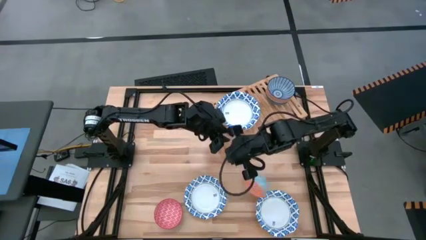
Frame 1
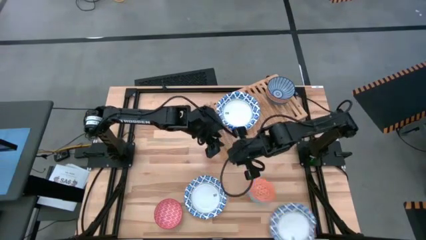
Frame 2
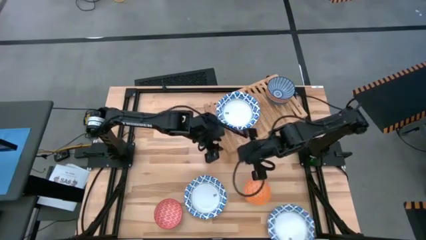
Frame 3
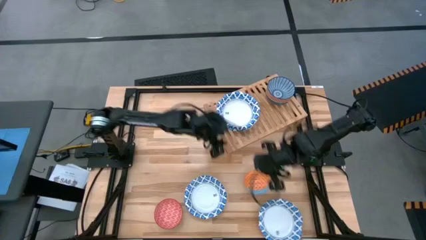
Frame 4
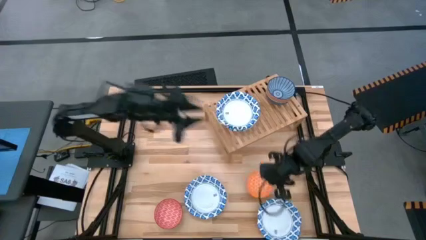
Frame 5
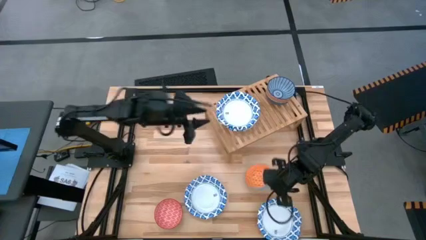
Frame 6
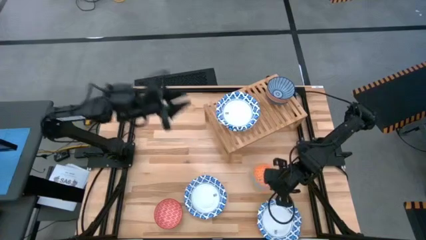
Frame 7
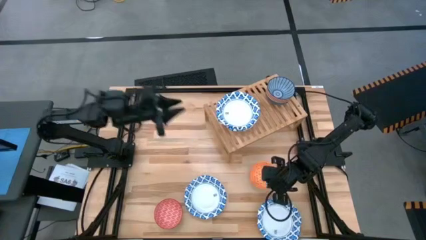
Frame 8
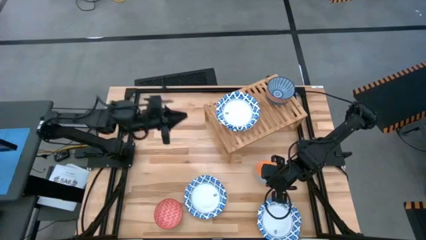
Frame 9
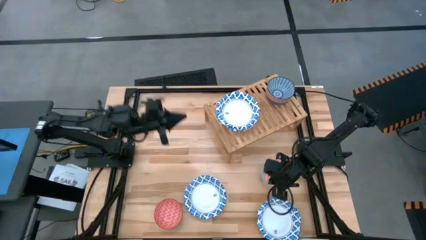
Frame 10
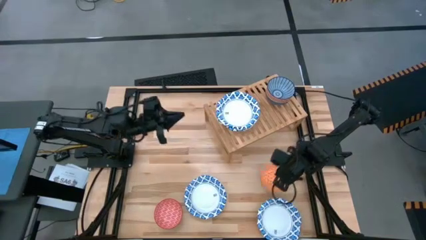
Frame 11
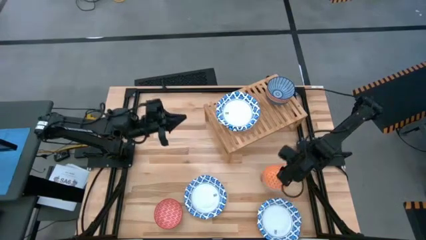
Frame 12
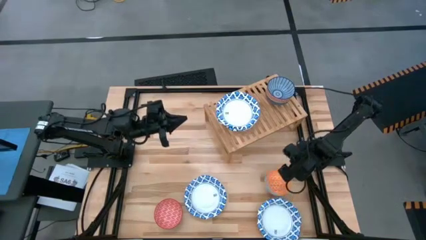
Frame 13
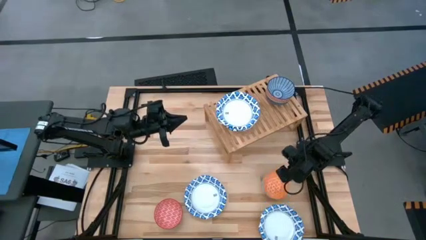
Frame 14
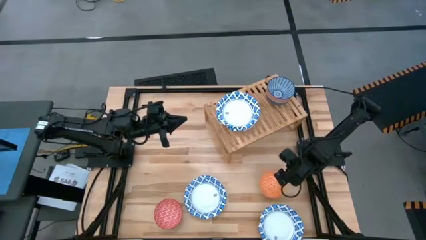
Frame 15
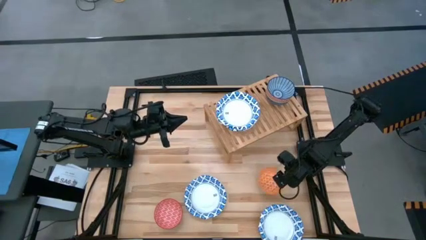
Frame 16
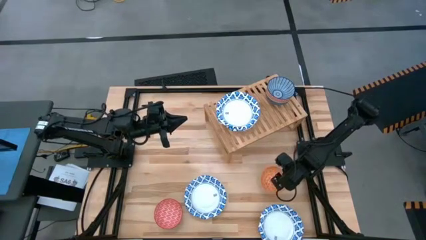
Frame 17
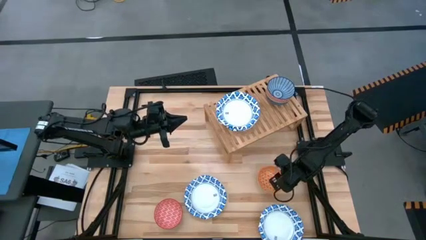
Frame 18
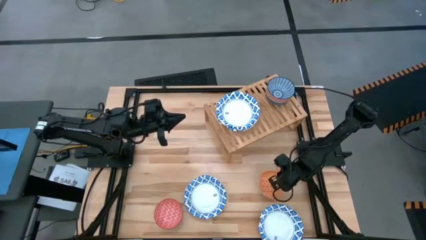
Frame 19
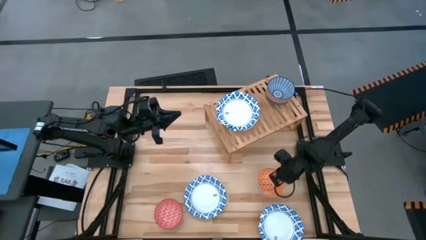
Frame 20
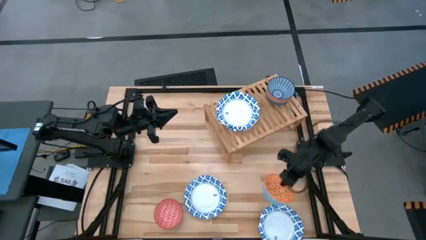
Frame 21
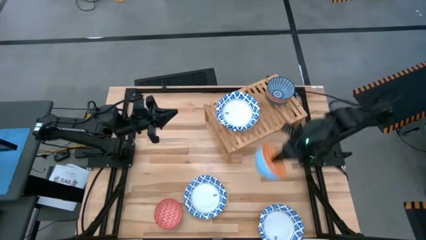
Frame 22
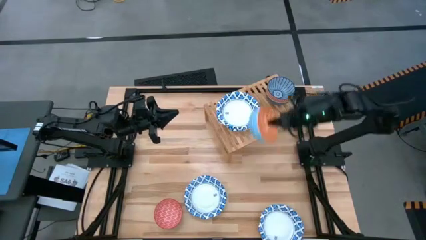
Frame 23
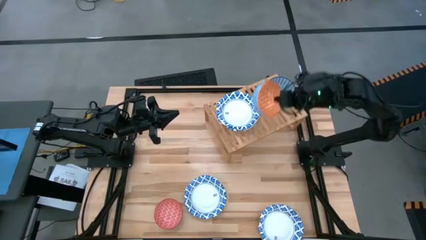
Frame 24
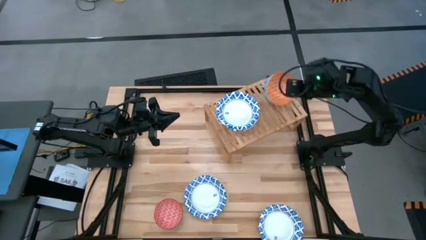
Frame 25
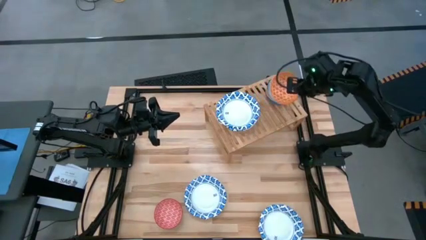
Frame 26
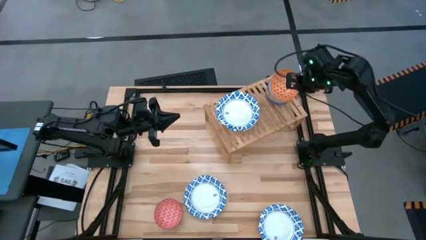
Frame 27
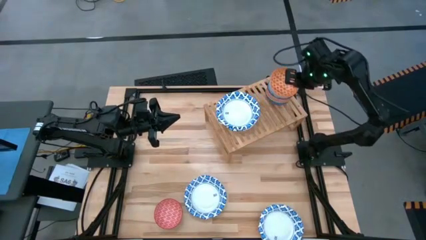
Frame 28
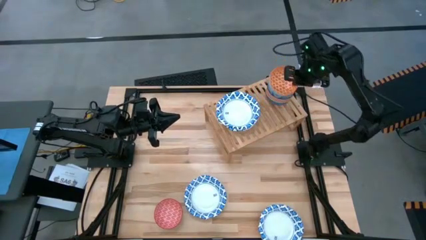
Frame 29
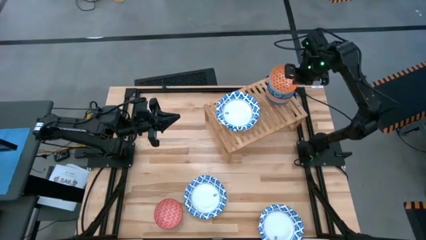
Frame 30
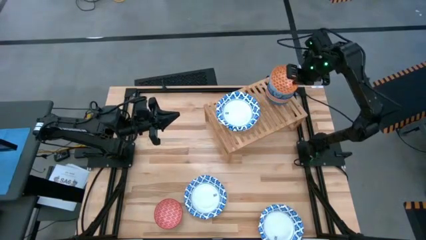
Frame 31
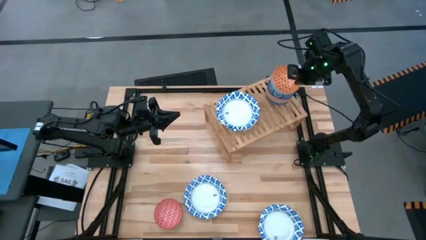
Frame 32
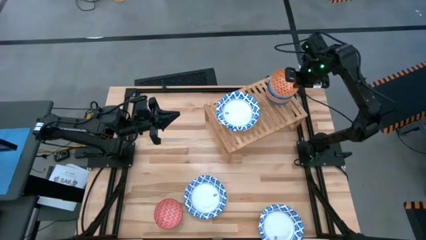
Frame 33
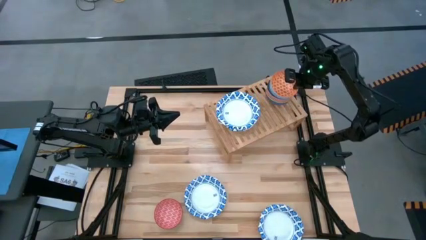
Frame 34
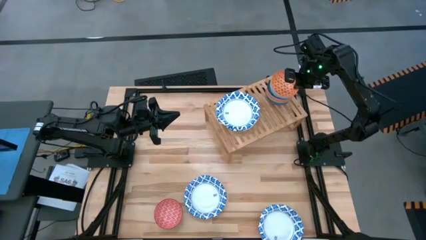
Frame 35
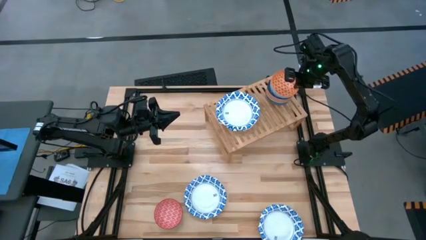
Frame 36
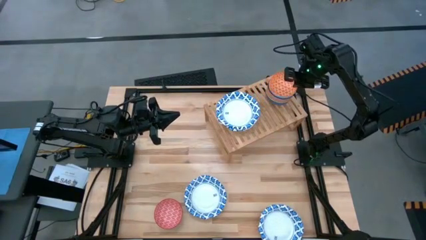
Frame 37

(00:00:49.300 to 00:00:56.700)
Task: Place and stack bowls onto a shelf
Stack the orange pattern bowl on top of the blue pattern bowl on the shelf

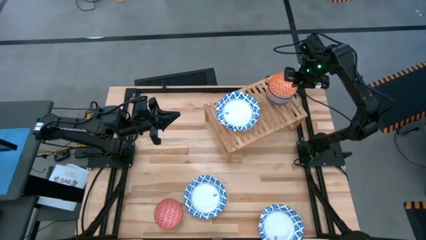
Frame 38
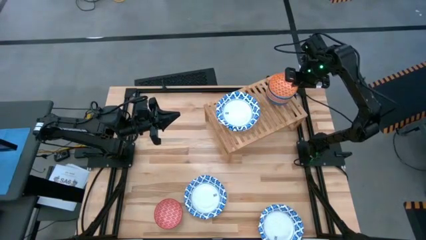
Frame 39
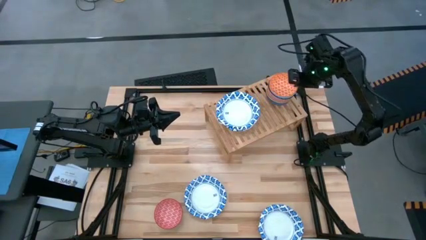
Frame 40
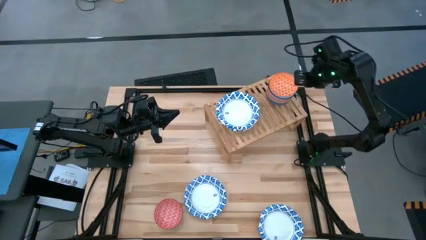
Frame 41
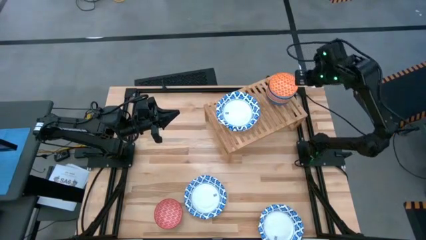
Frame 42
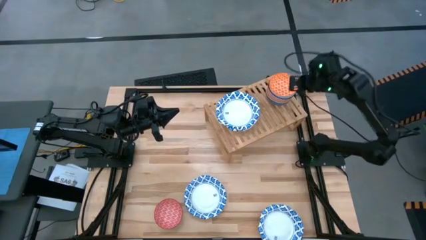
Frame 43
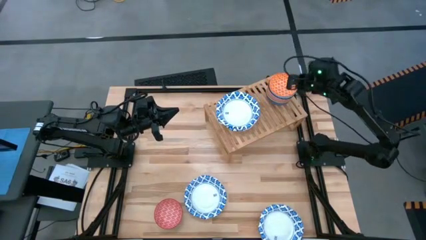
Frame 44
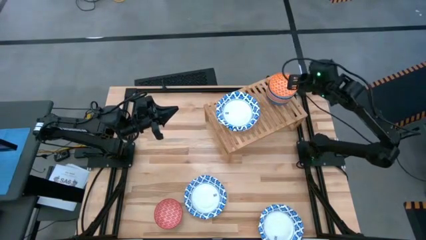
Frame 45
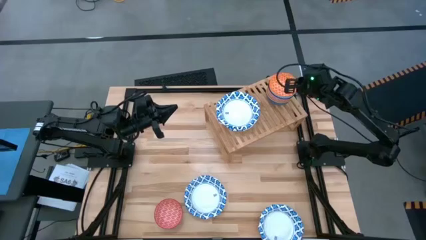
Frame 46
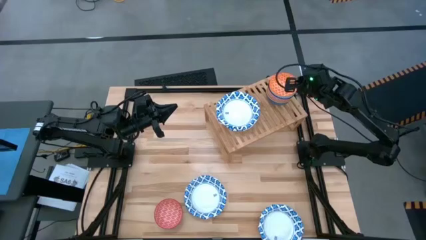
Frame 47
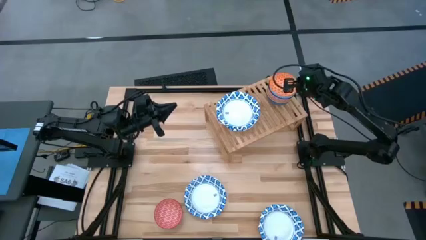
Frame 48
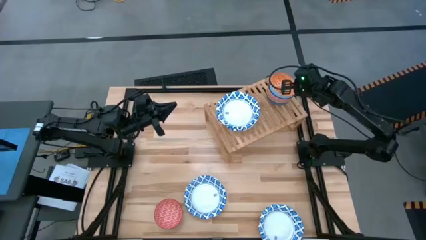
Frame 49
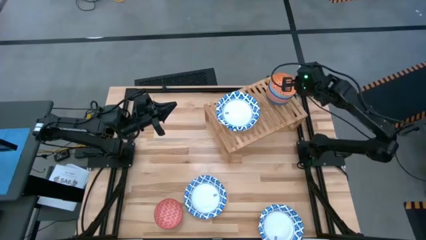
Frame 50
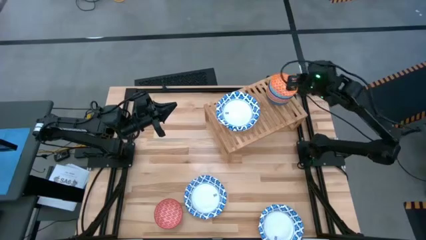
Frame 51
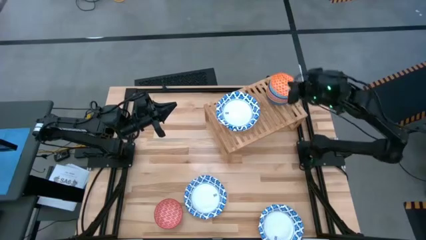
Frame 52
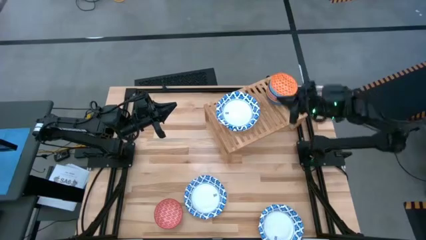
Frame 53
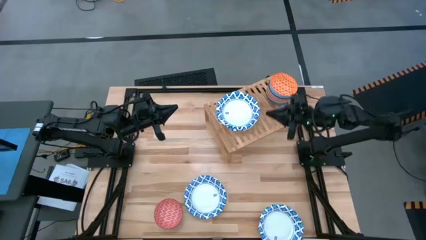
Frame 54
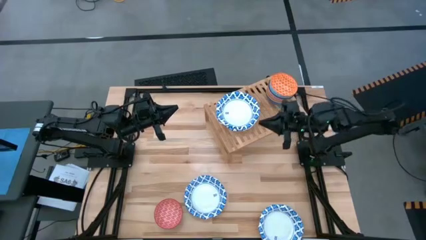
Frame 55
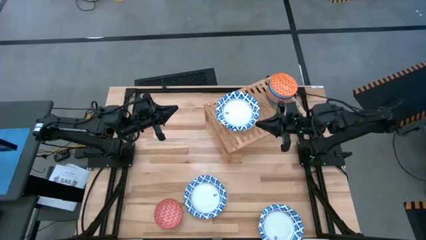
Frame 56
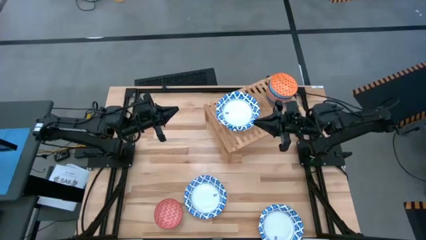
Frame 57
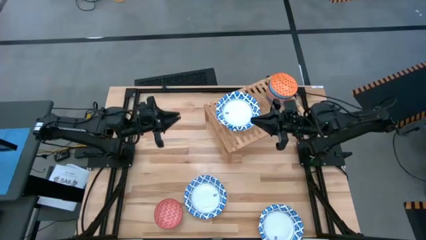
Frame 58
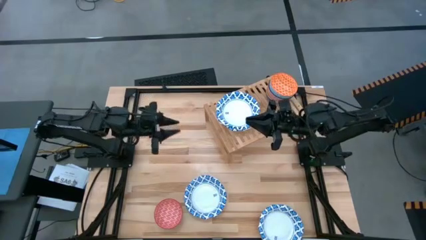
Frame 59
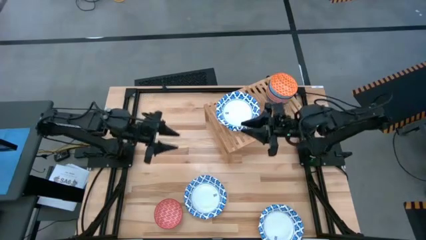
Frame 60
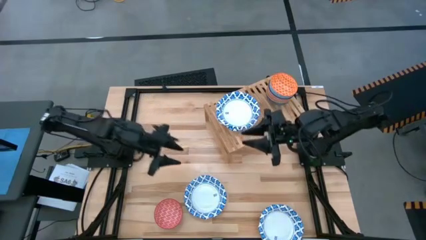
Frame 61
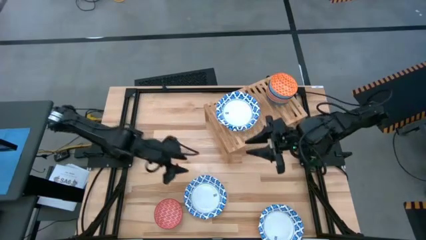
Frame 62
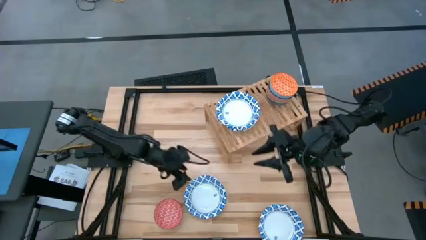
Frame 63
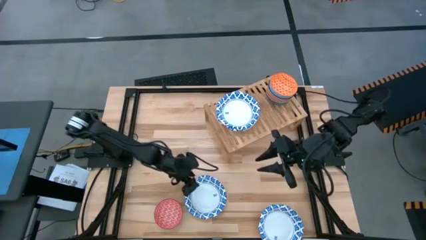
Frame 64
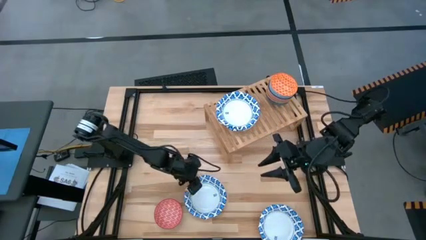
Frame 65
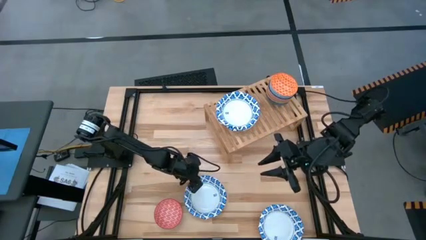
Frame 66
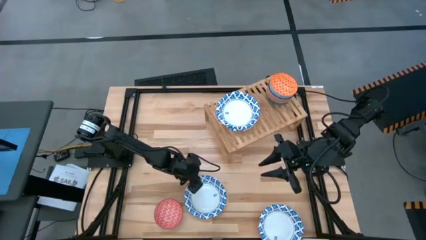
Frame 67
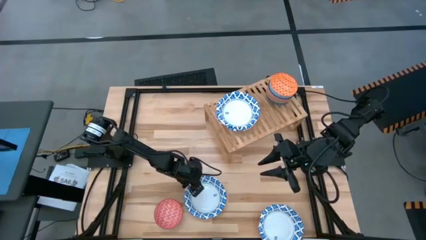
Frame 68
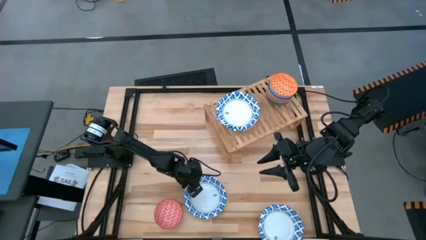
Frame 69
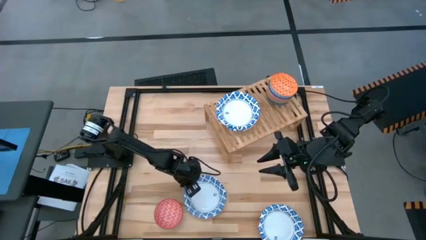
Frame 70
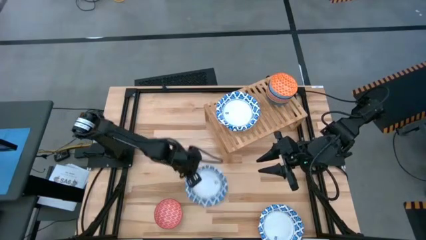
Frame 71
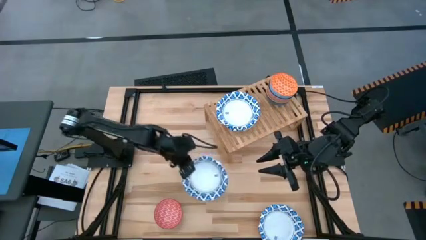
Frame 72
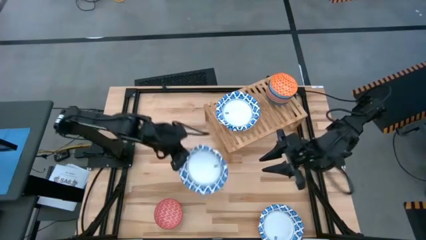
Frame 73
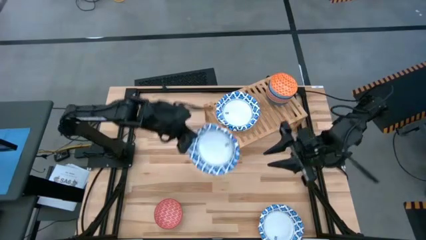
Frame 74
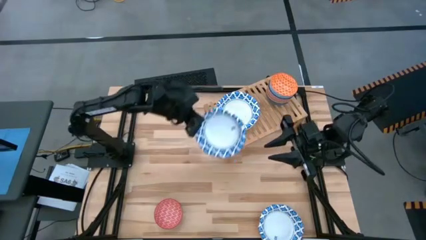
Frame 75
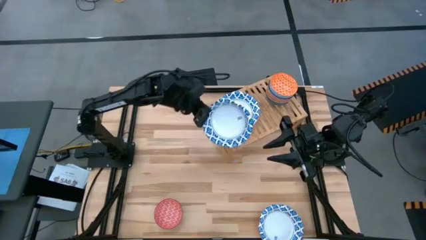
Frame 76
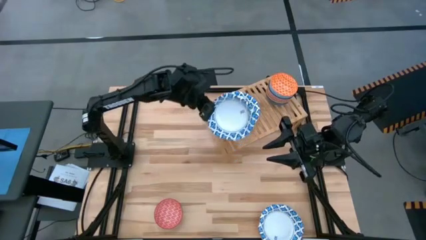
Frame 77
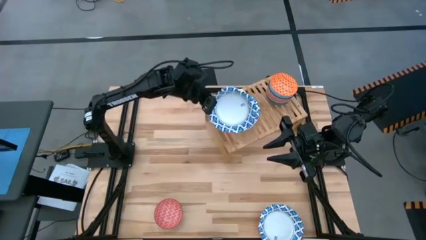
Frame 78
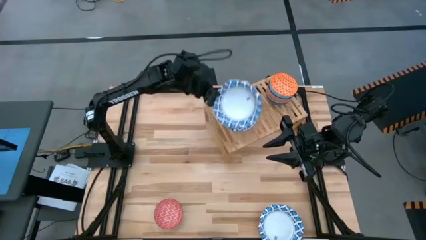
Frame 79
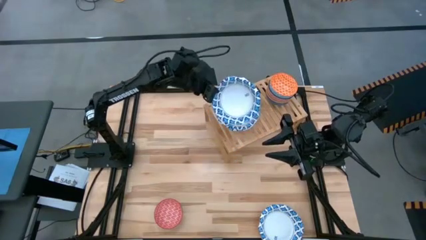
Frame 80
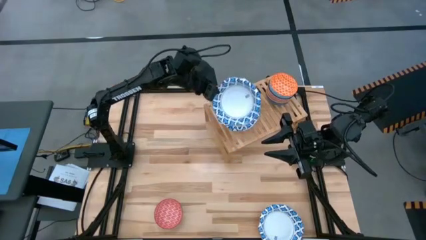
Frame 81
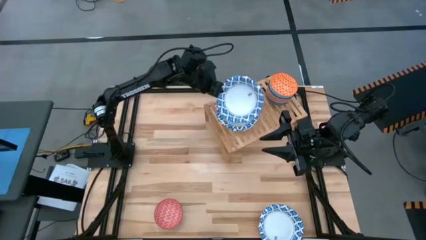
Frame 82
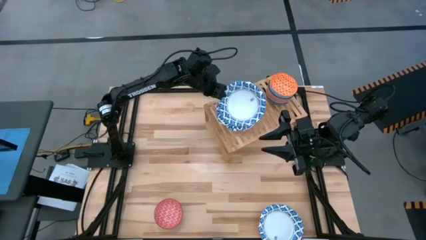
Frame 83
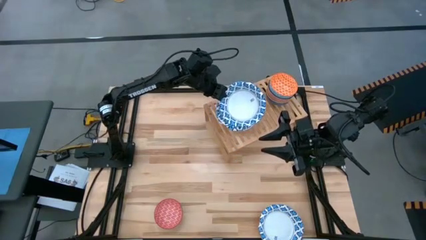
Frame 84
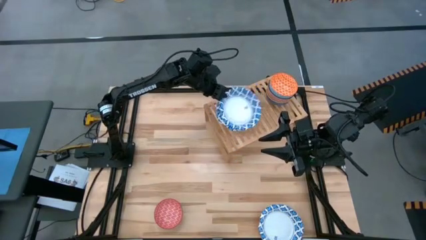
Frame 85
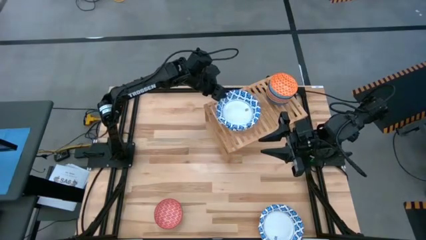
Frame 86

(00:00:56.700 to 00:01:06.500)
Stack the top white pattern bowl on top of the white pattern bowl on the shelf
